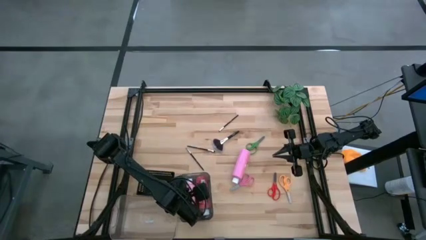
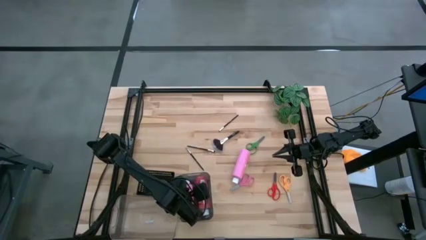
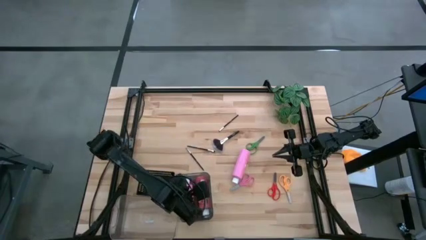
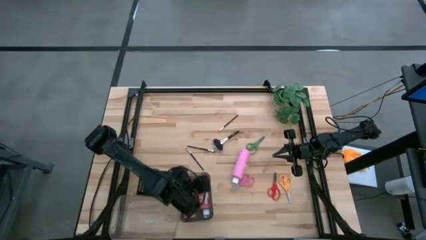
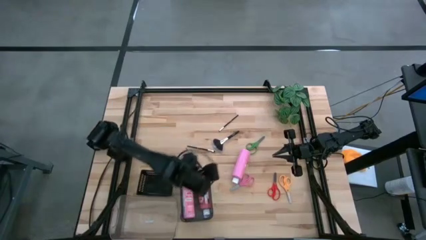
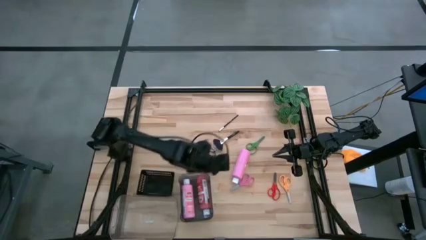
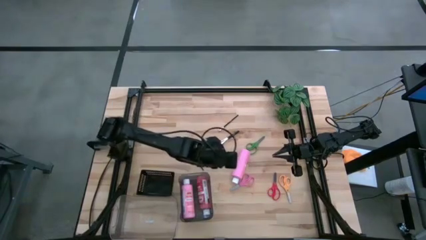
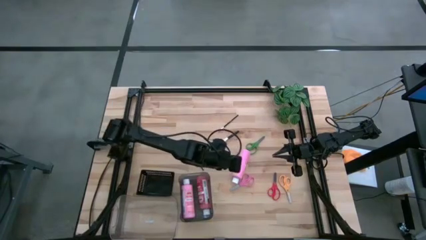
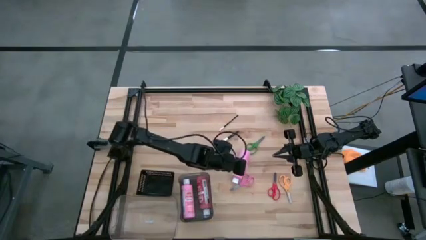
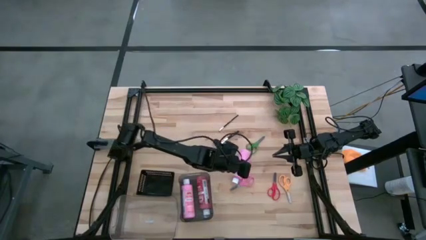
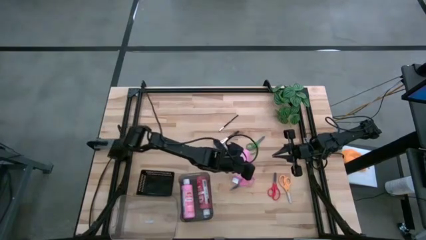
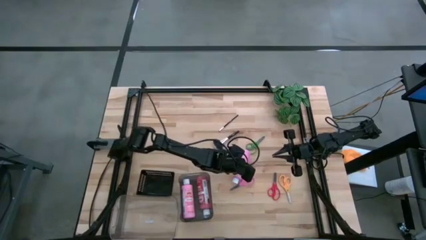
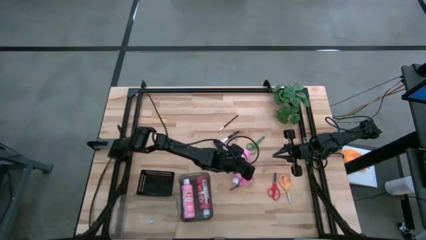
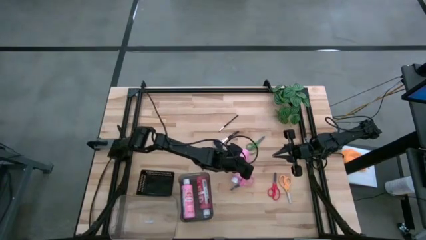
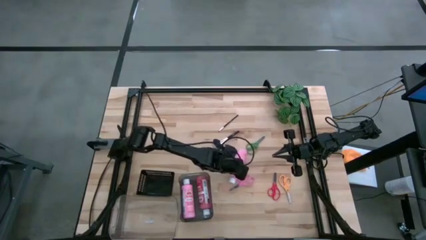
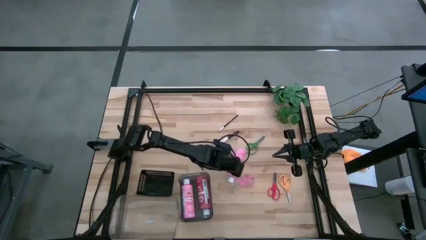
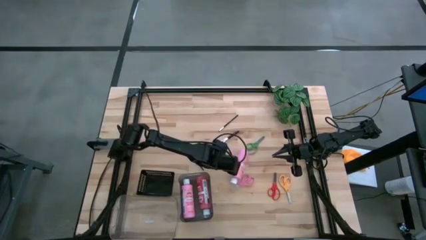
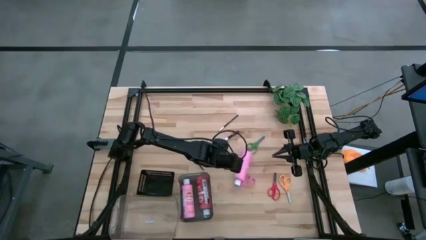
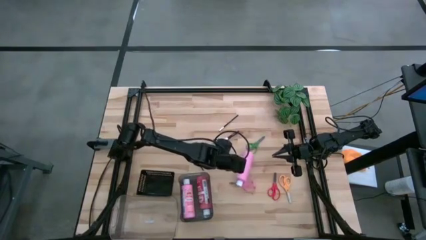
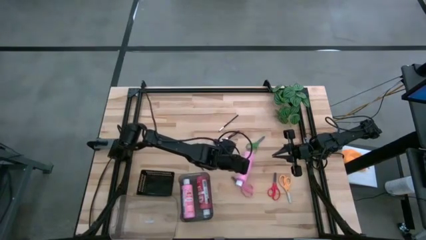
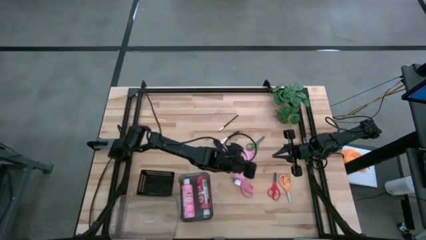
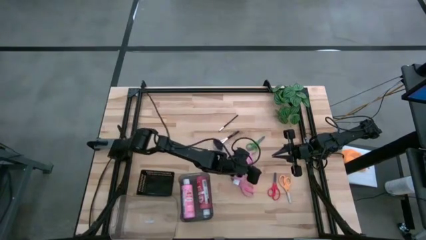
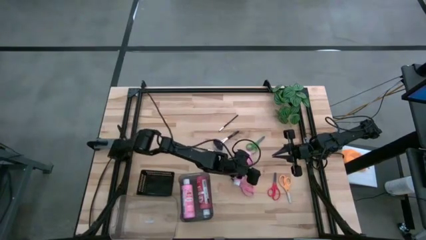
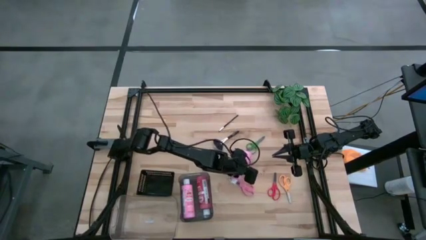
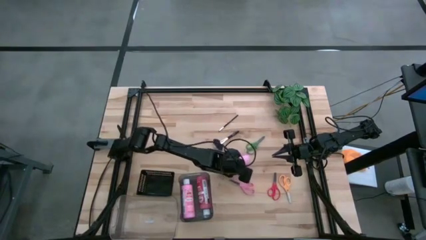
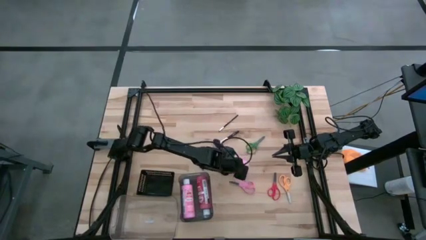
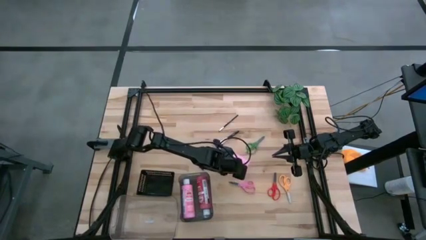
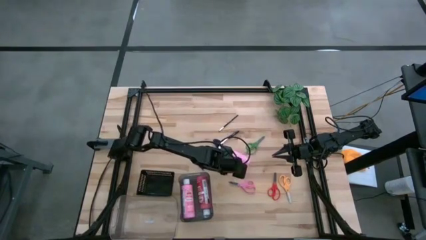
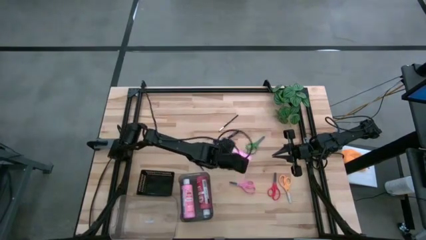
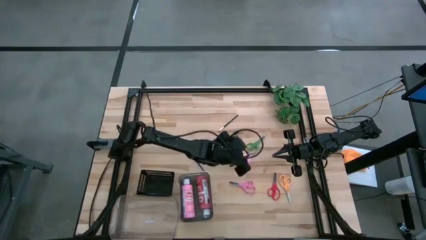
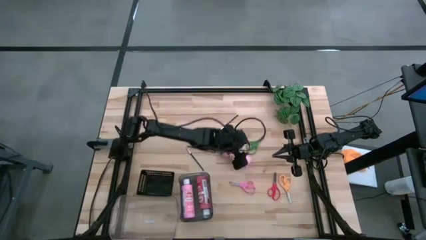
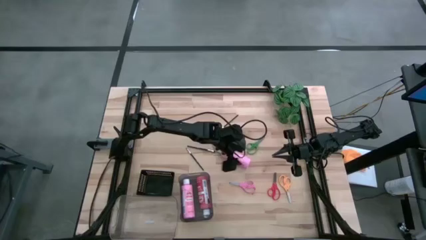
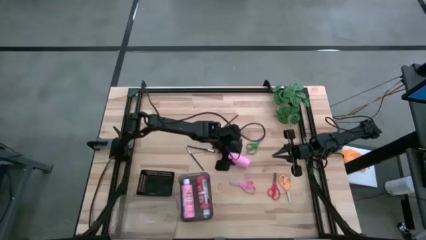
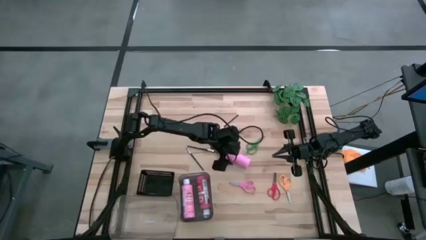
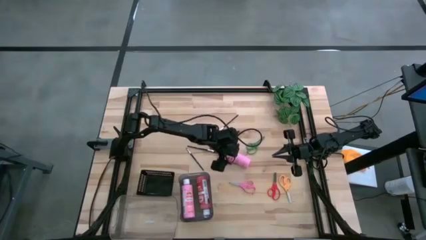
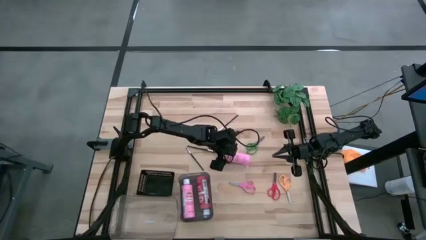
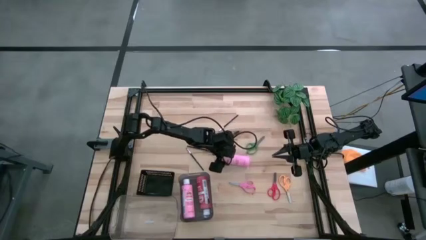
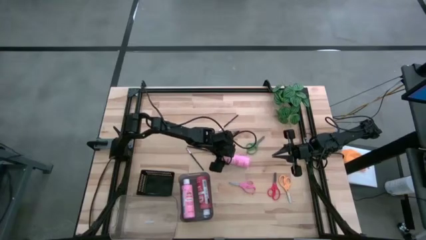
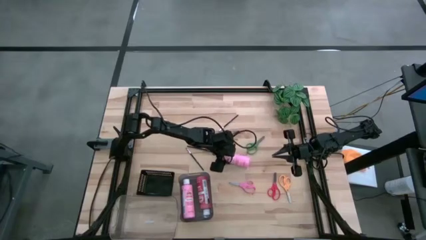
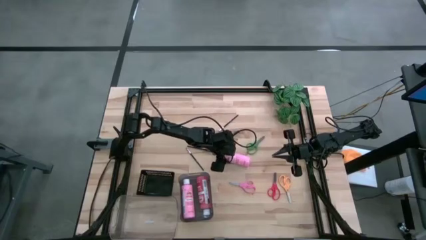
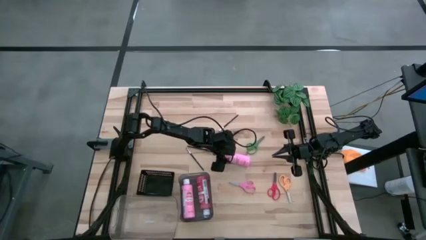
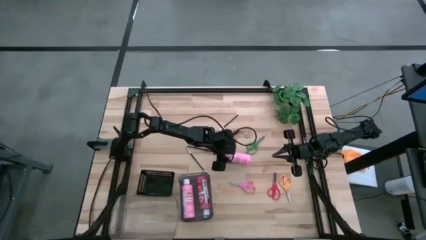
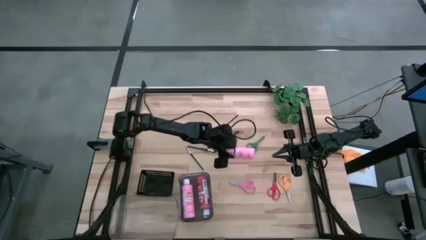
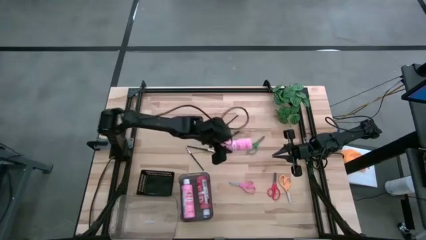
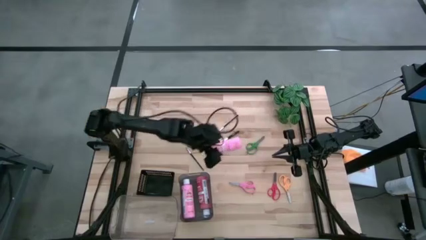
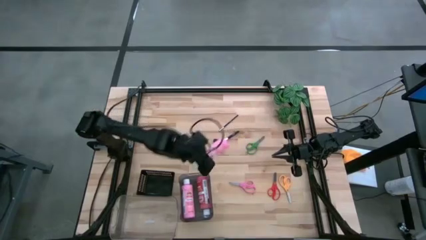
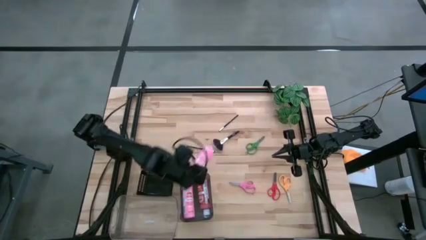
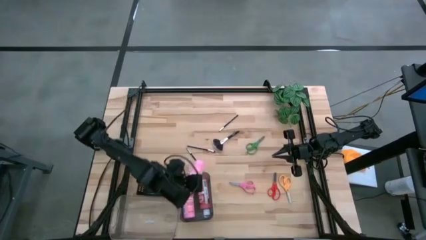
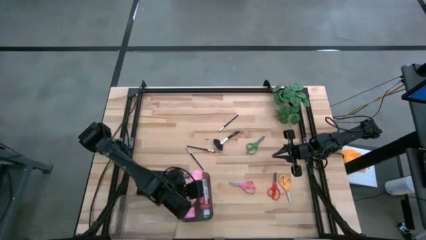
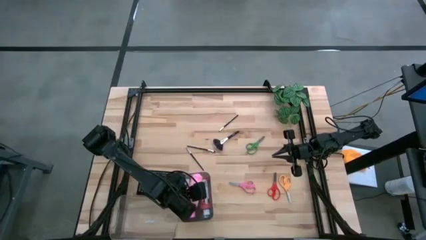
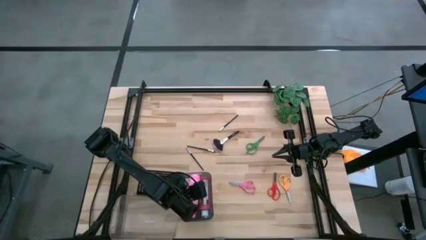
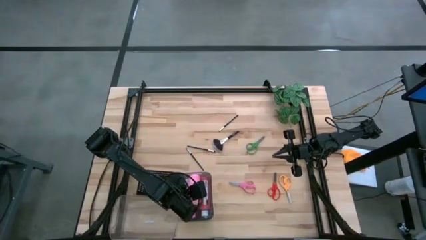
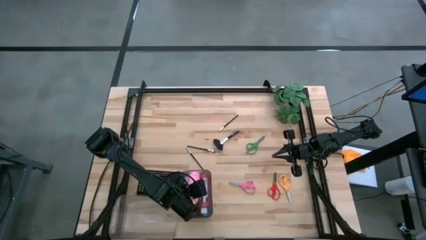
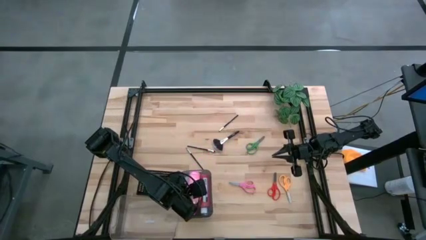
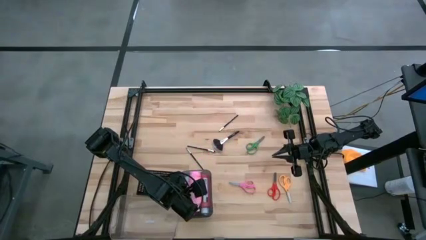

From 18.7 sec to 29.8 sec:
Task: Pick & Place Paint Supplies
Put the pink paint bottle into the gray bin
